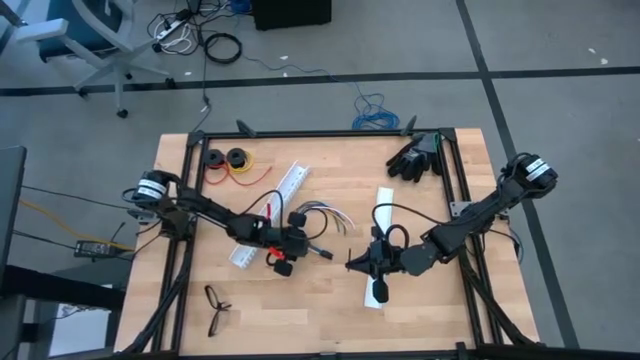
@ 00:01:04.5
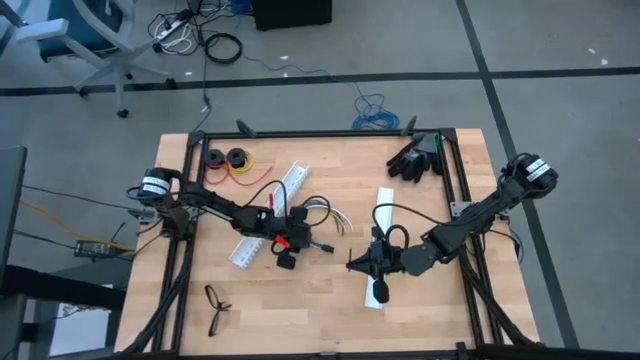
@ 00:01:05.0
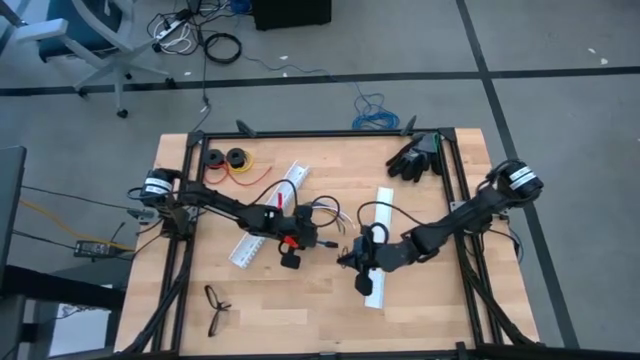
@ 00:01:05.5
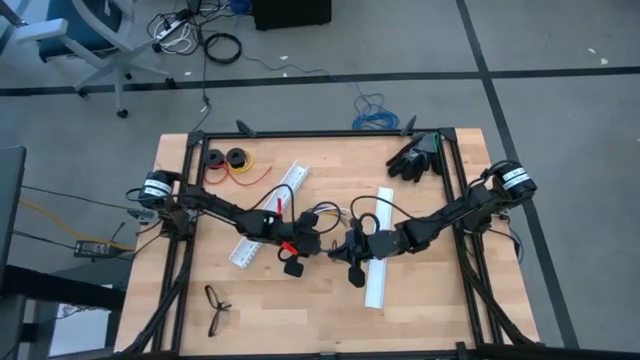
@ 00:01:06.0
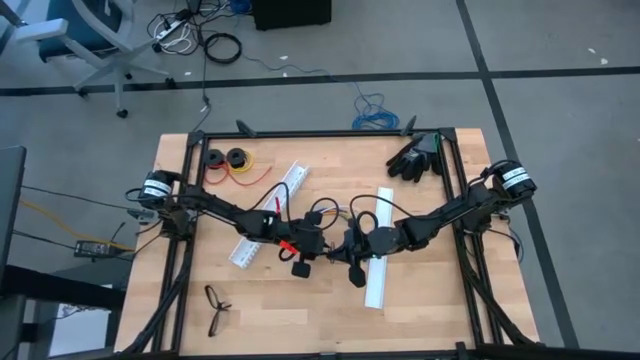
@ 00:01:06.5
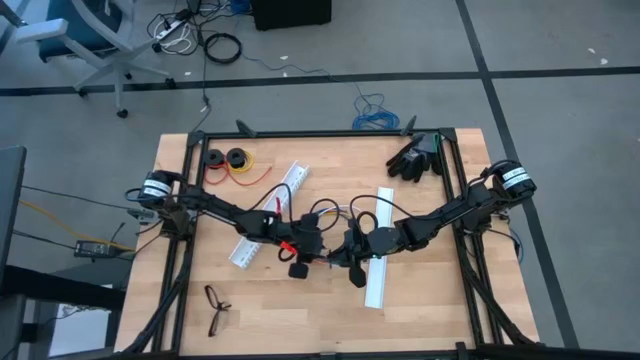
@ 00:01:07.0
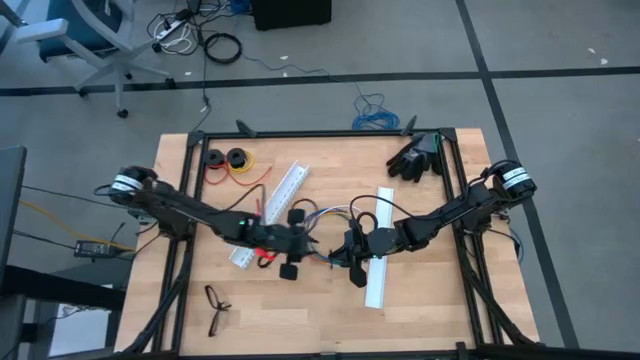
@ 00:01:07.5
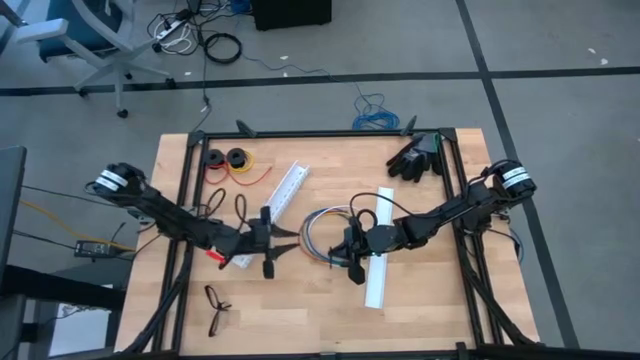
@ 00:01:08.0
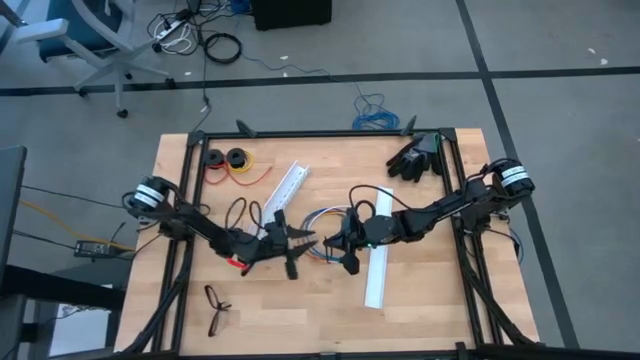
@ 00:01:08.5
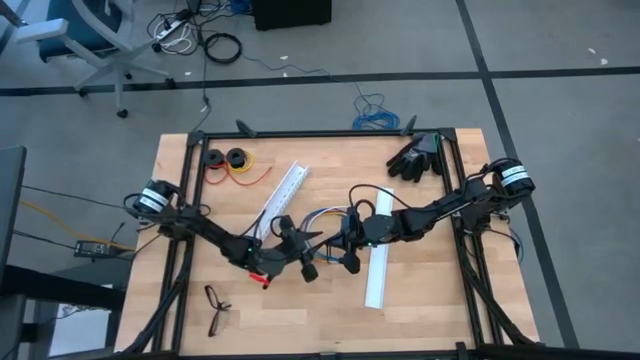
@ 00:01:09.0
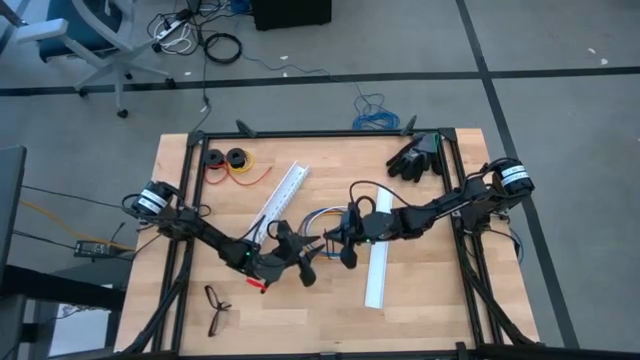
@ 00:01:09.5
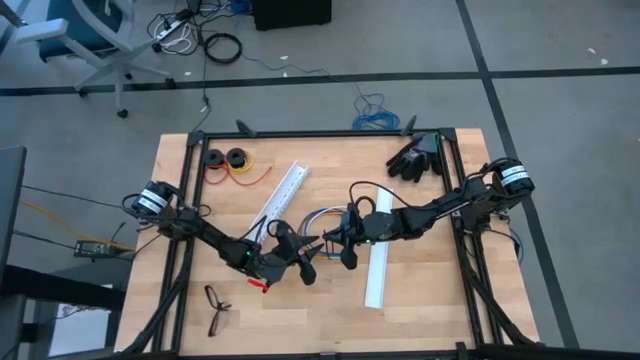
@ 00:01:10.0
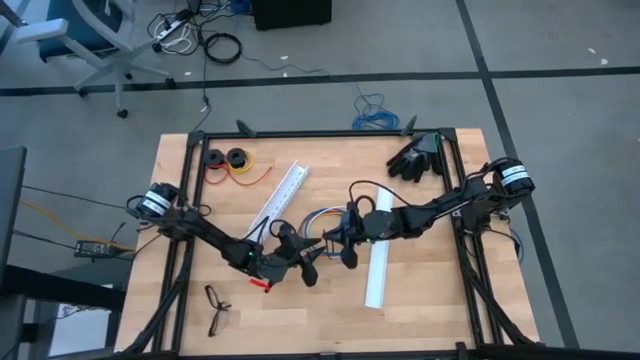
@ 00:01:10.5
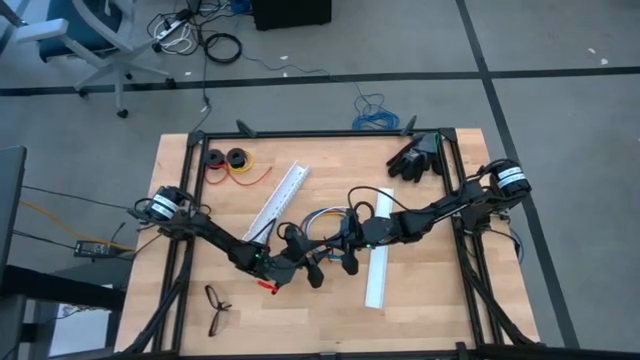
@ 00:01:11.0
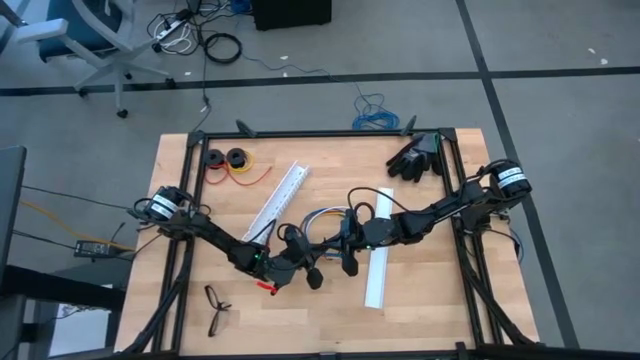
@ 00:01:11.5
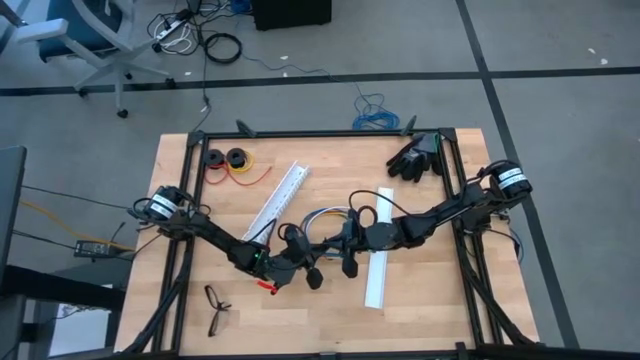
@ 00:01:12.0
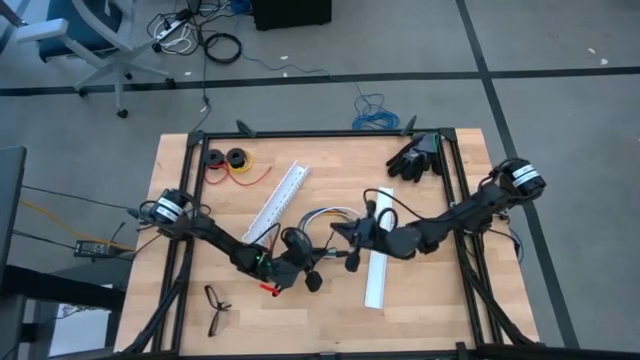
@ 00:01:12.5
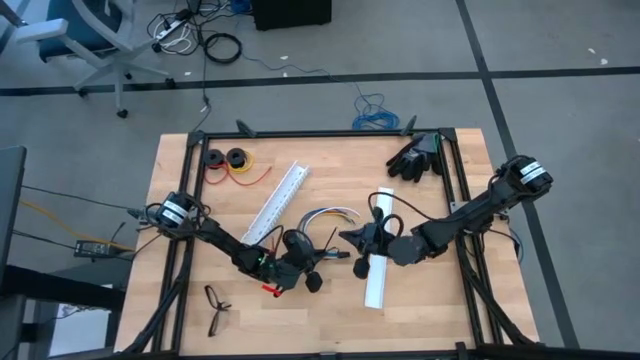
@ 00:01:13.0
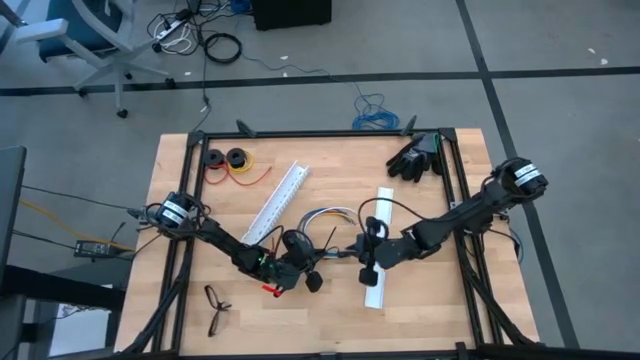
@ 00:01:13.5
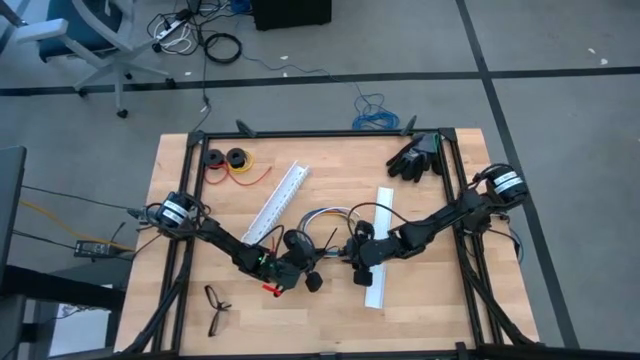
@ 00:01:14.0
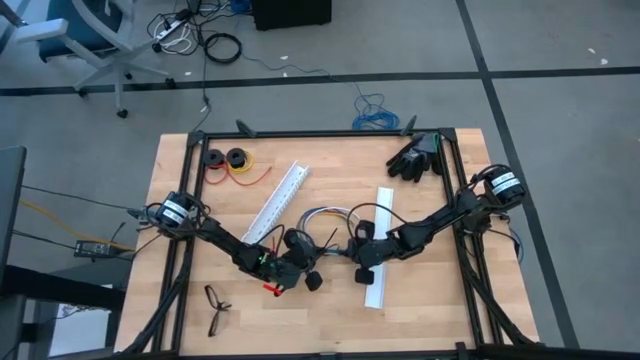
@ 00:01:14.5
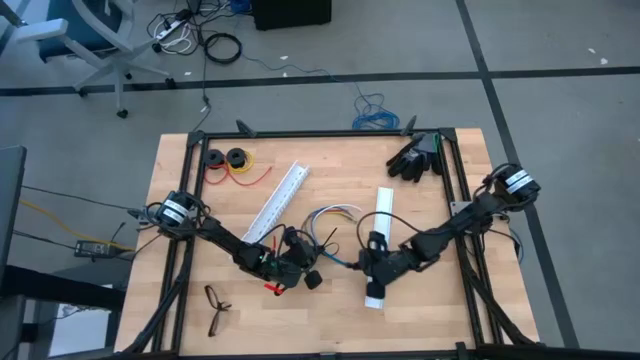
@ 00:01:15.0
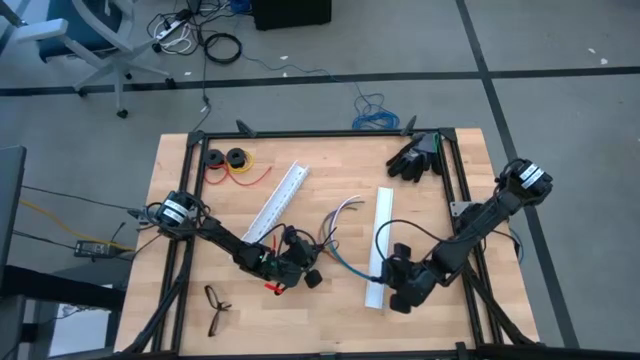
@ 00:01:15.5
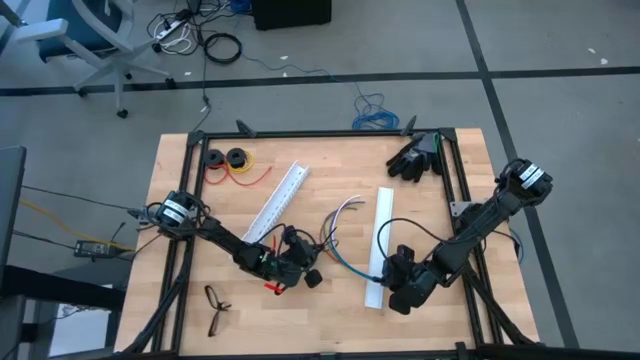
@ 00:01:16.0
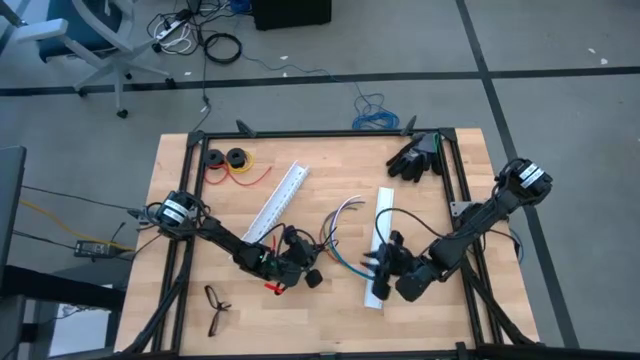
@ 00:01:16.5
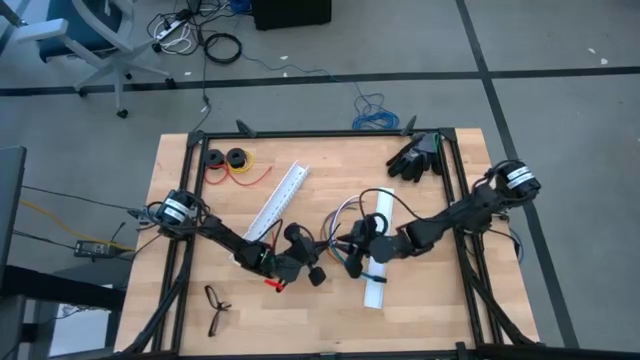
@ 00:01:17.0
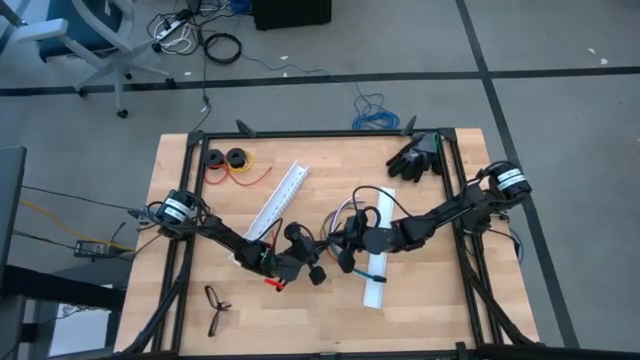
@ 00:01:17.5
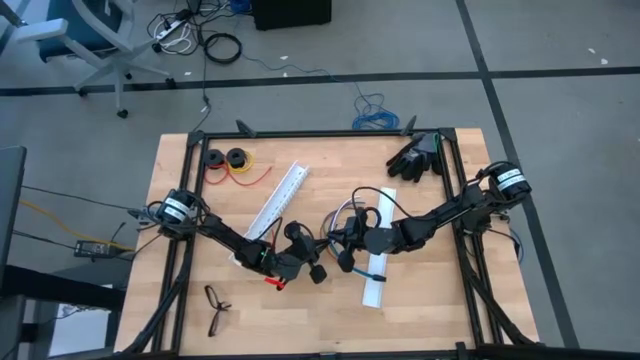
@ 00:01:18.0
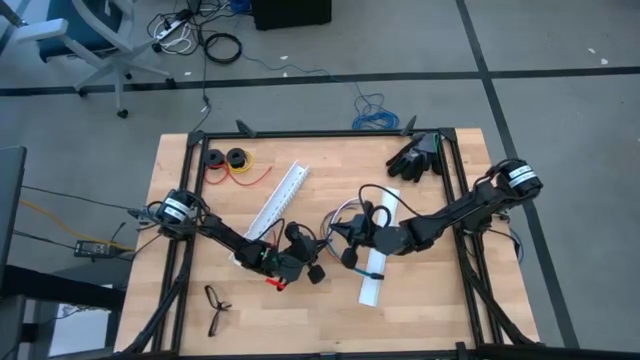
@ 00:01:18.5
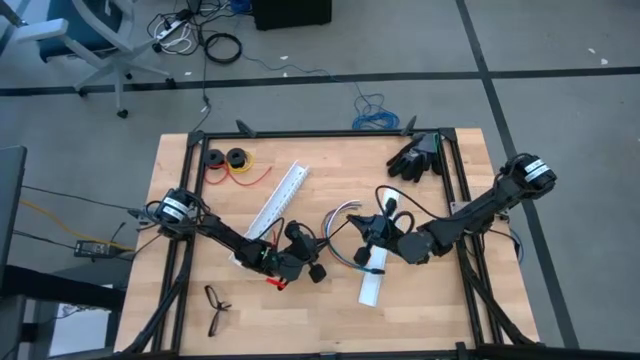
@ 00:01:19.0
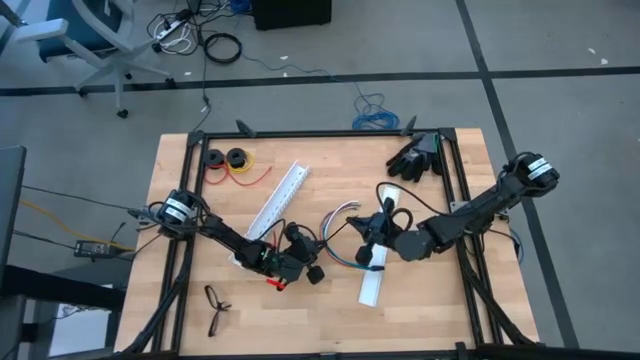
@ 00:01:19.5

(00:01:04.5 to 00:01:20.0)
Task: Ziptie cables
Wrap the cable wires together using the black zip tie
